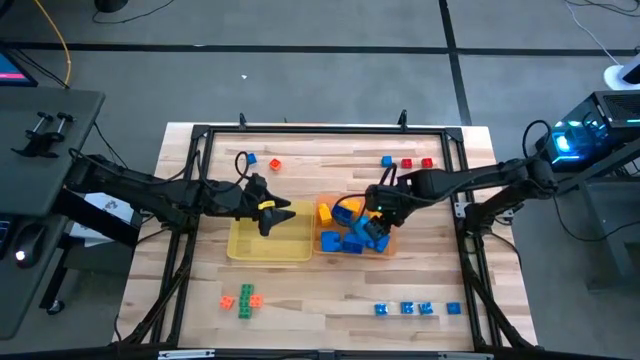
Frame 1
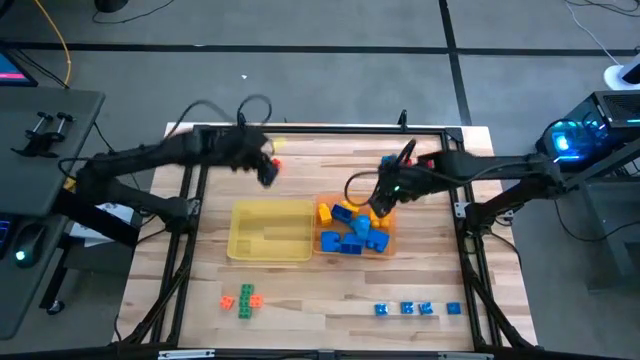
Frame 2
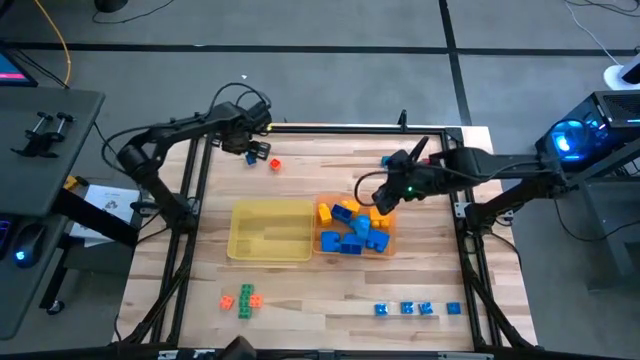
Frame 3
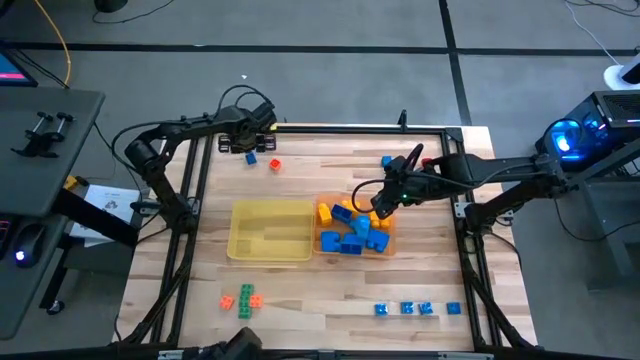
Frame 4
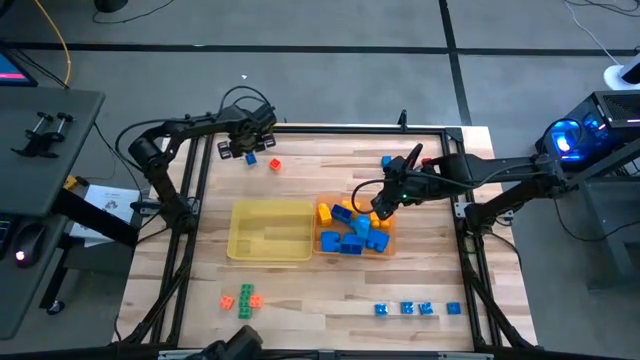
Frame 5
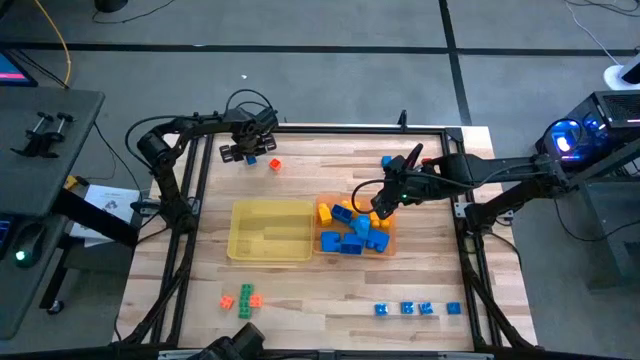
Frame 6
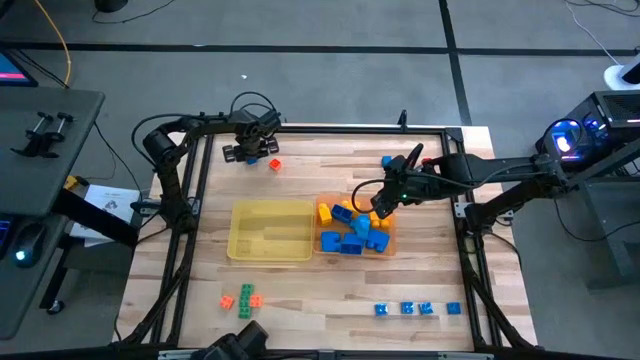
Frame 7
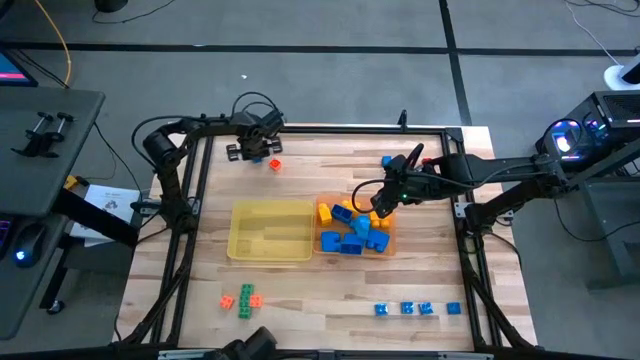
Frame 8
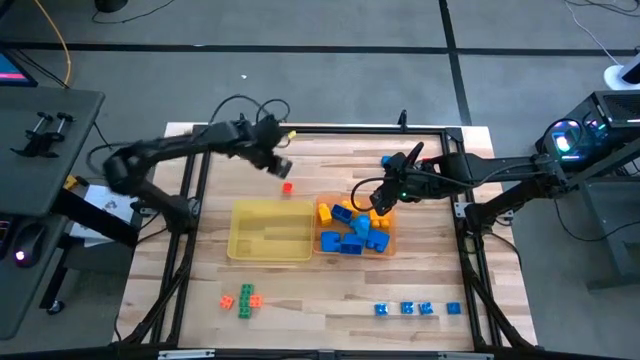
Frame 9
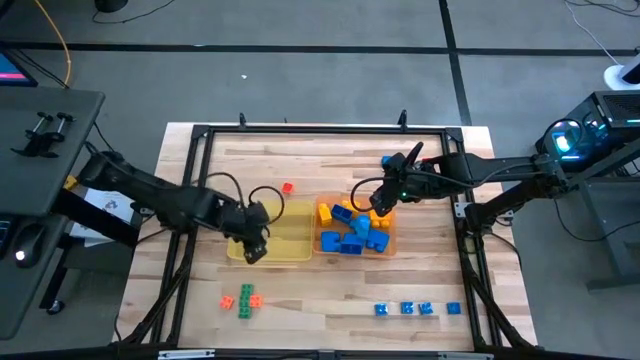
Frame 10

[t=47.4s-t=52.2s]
Task: Sort blocks by size
Put the small blue game piece into the yellow bin

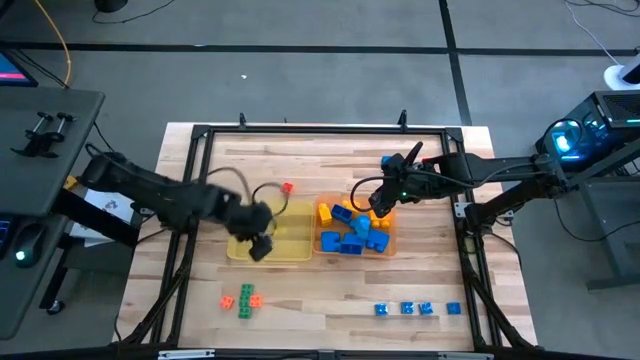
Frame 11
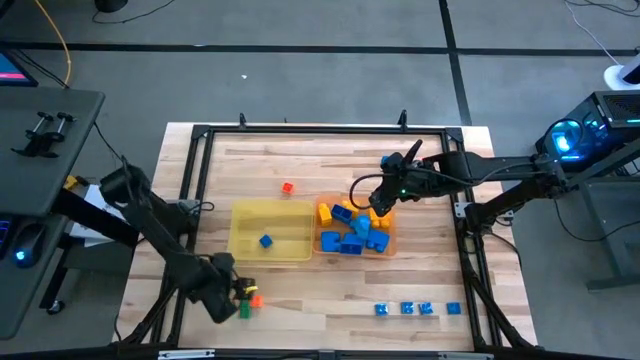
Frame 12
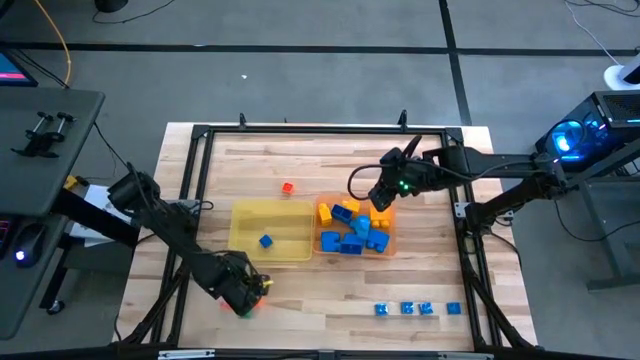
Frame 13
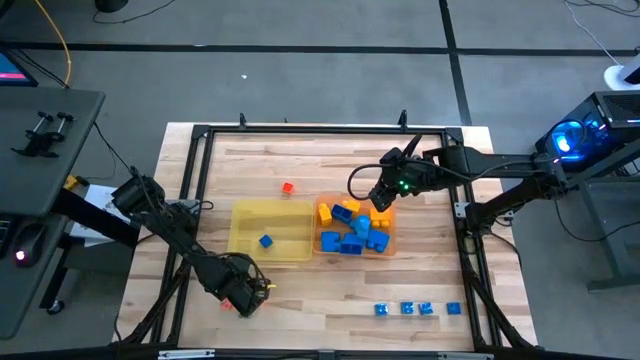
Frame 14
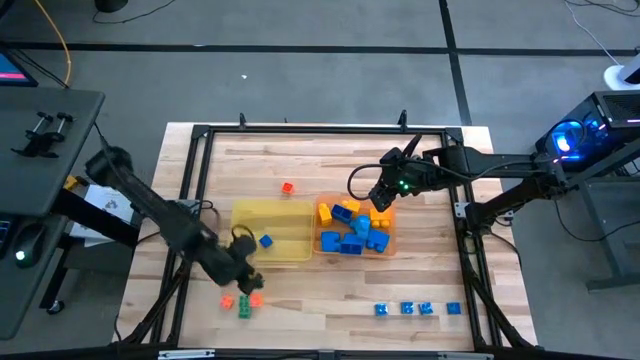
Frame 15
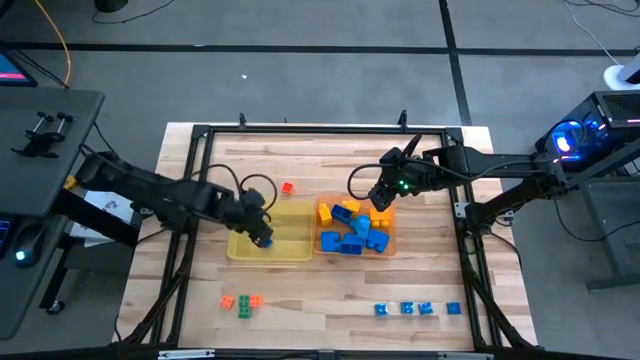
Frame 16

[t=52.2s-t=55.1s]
Put the top small green game piece into the yellow bin

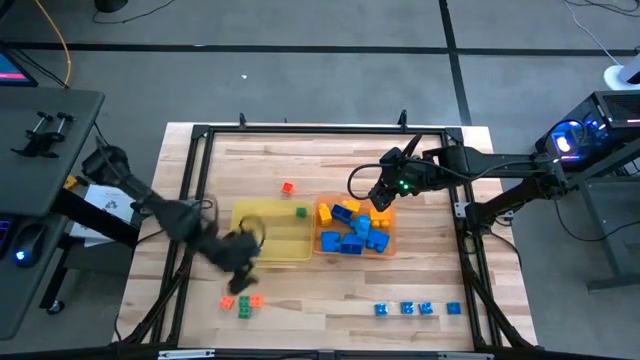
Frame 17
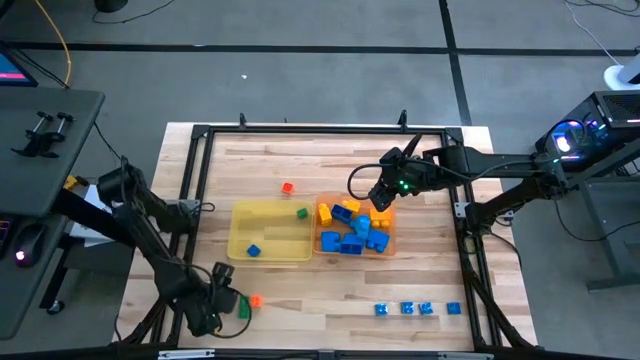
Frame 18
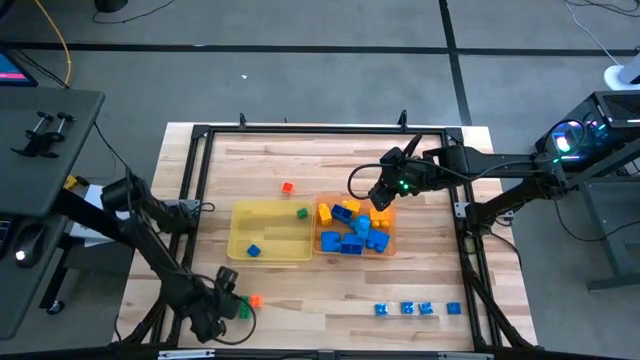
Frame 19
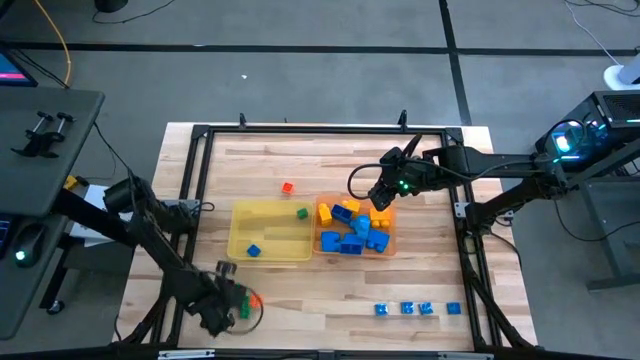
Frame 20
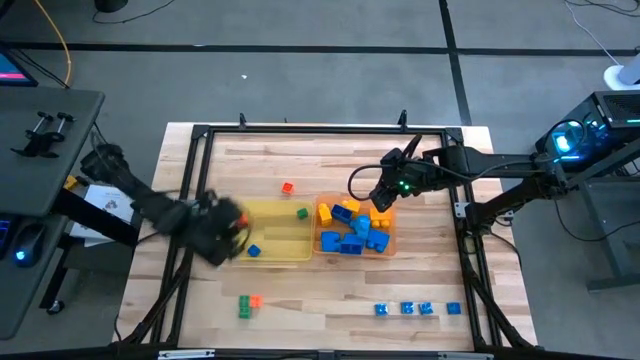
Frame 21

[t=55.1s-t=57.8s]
Put the left small orange game piece into the yellow bin

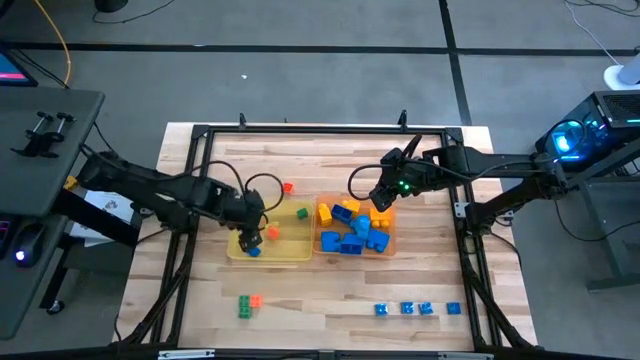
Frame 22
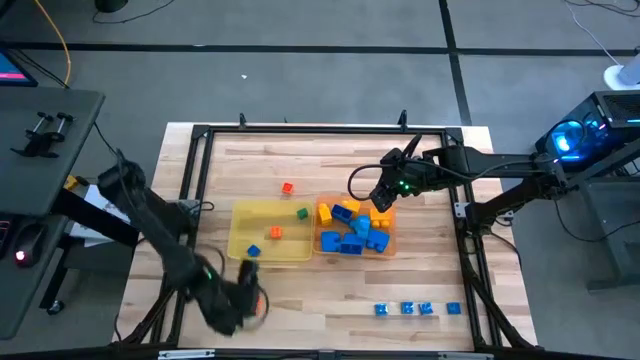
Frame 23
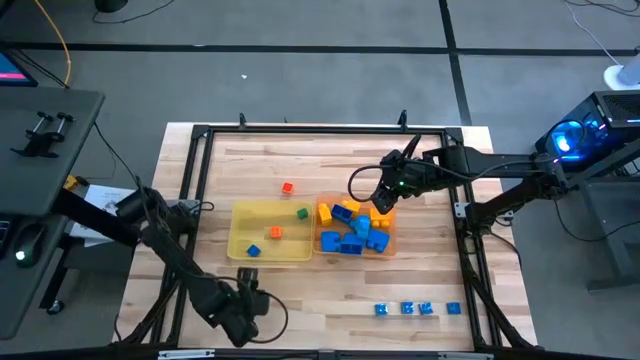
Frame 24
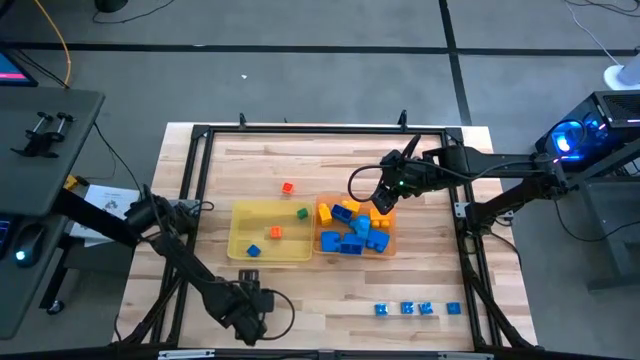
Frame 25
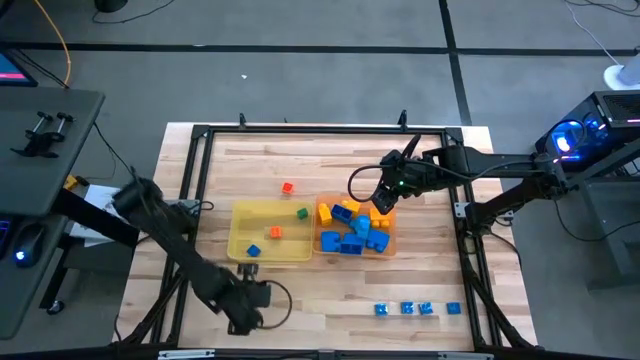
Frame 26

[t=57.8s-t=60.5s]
Put the bottom small orange game piece into the yellow bin

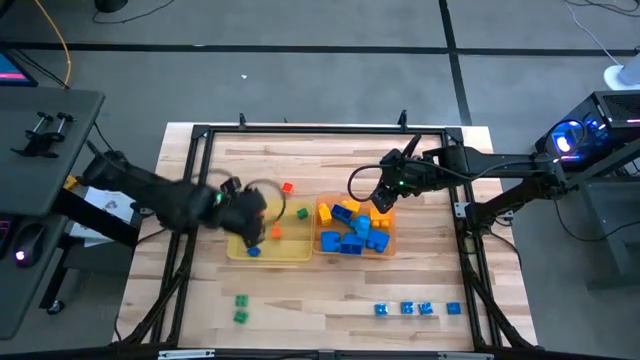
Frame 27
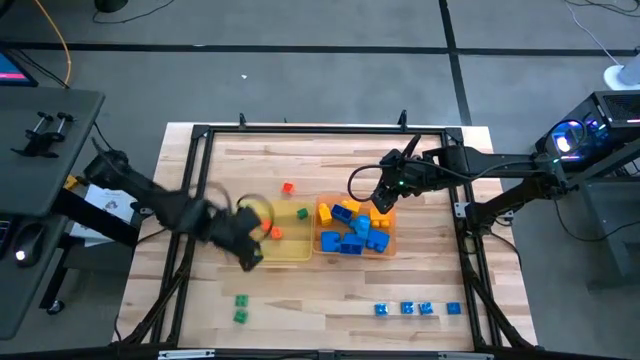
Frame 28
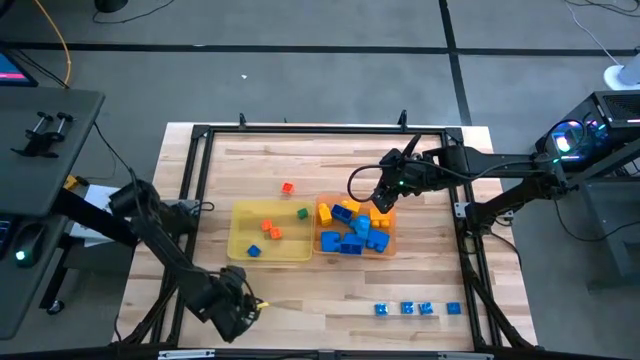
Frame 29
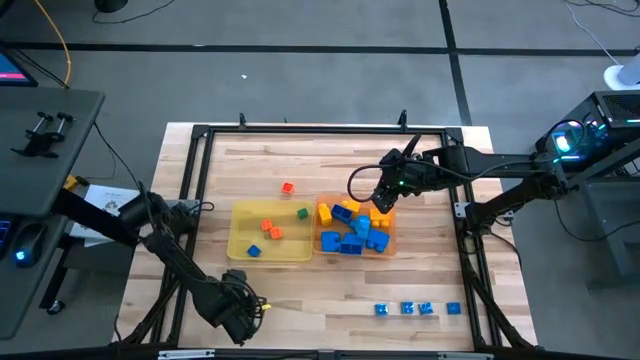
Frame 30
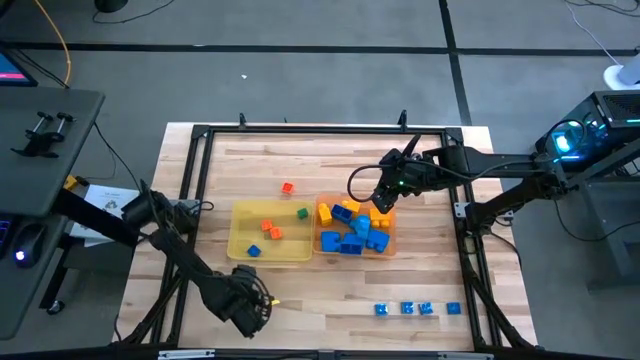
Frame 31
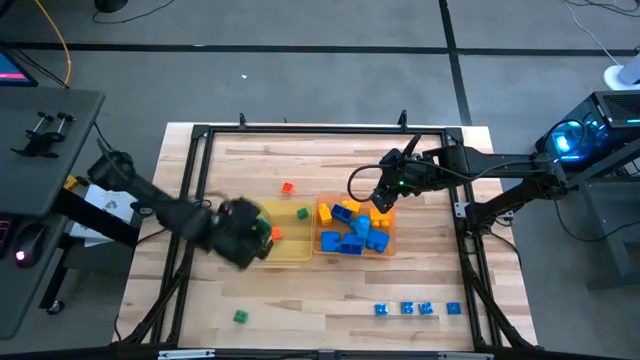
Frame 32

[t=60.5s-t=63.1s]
Put the top small green game piece into the yellow bin

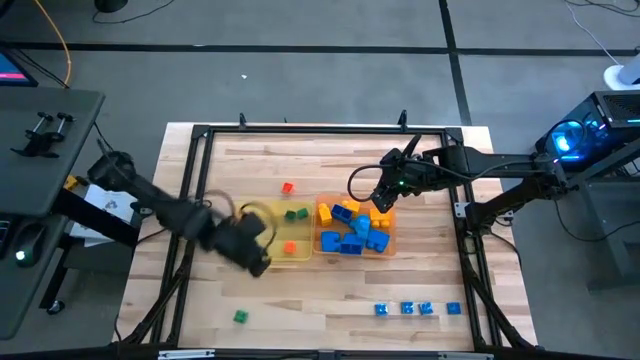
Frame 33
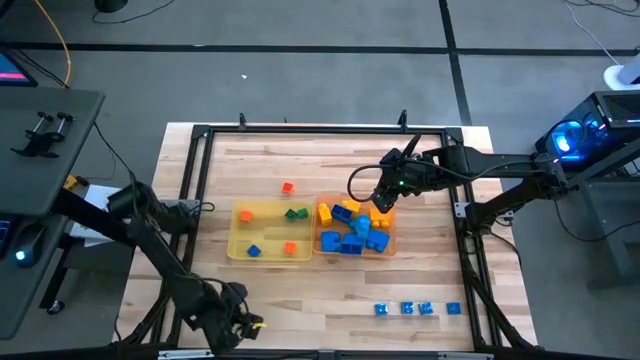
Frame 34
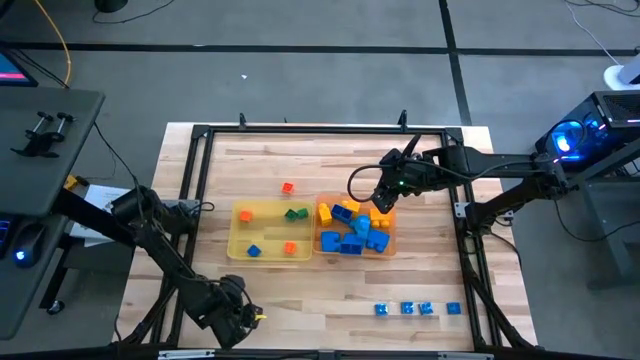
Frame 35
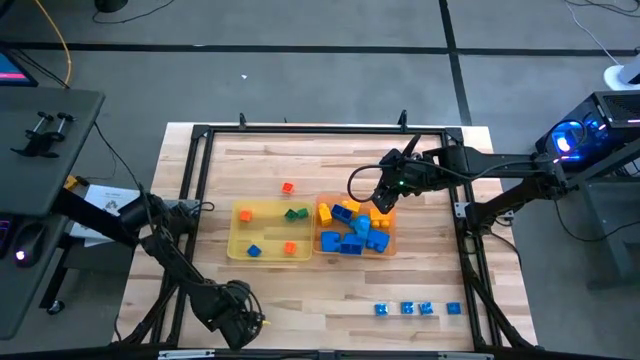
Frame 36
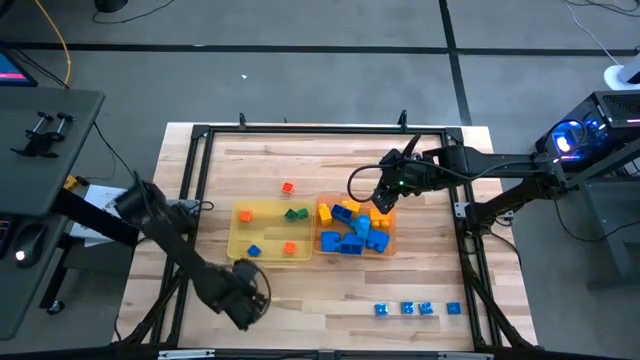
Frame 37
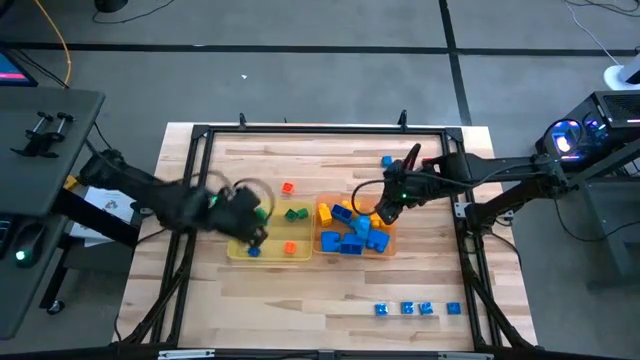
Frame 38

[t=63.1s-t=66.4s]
Put the small green game piece into the yellow bin

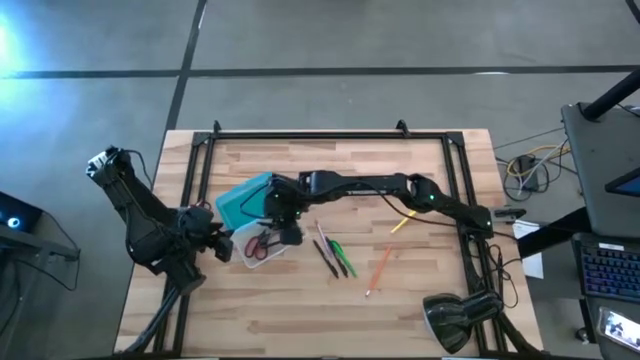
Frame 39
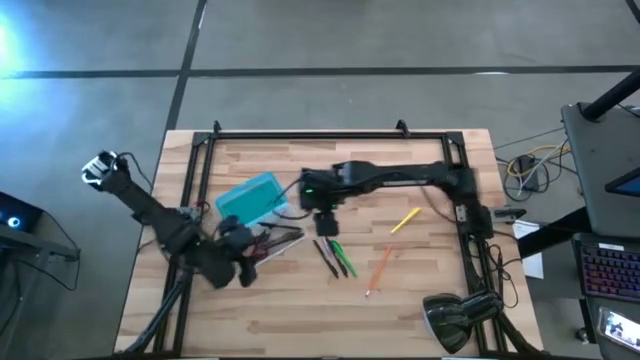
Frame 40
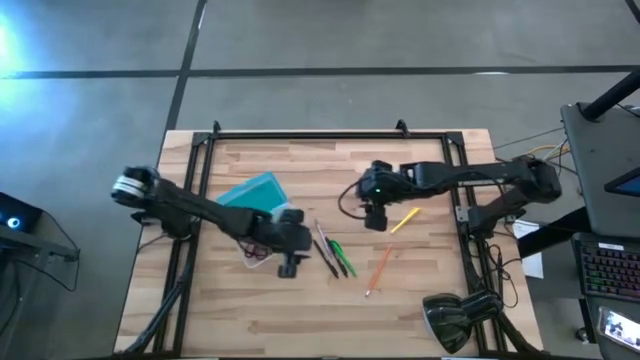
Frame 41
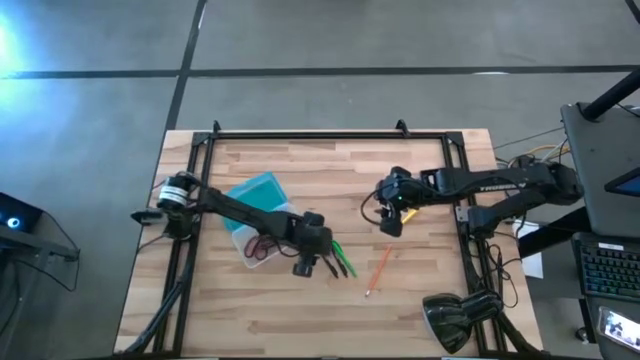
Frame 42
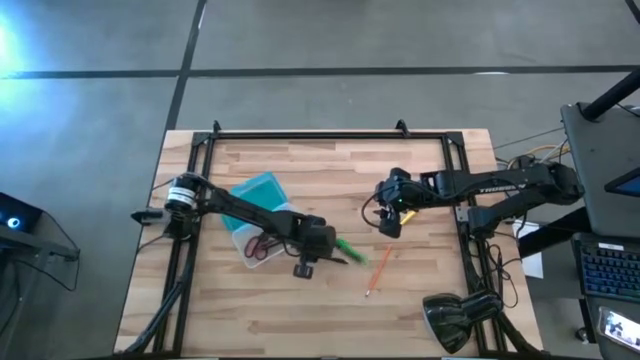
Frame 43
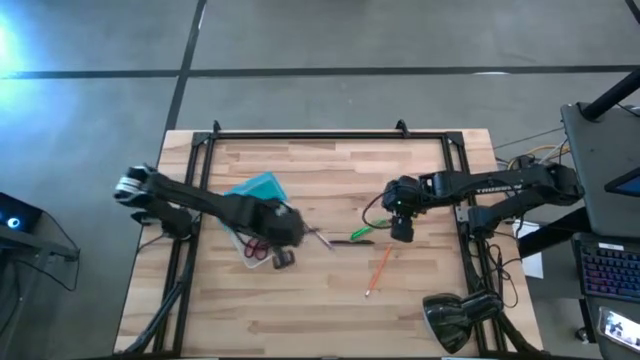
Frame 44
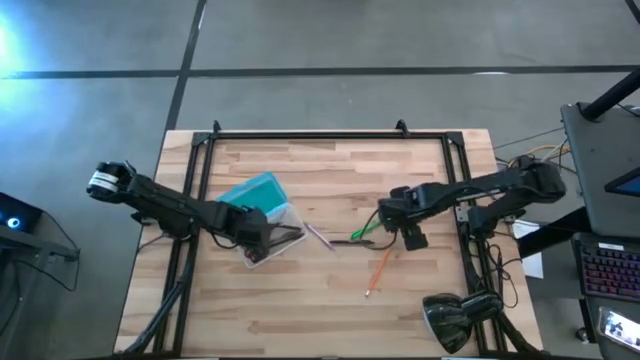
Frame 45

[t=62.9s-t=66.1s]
Task: Pick & place school supplies into a supply box
Put the black pen into the blue supply box

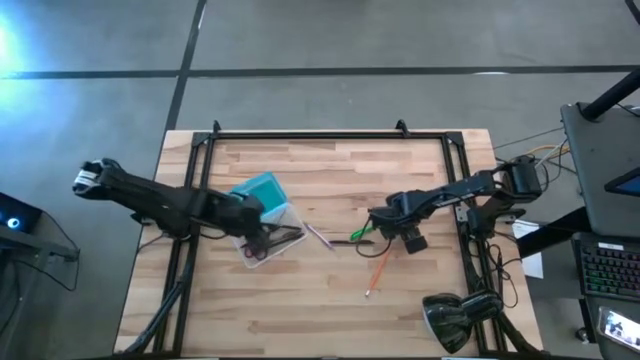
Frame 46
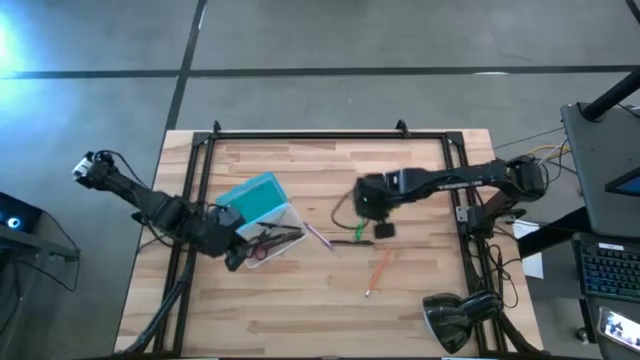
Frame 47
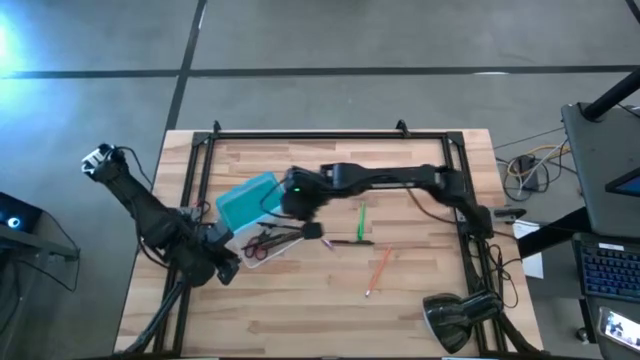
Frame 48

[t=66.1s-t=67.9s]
Put the yellow pen into the blue supply box
